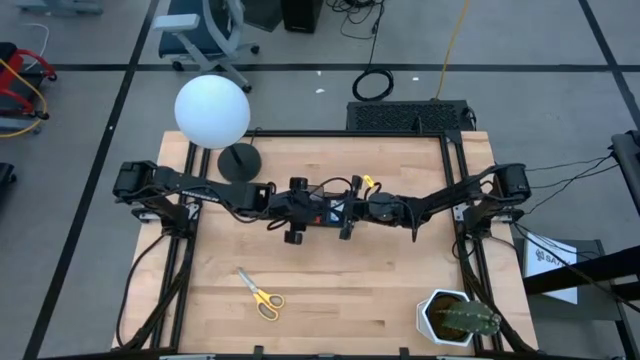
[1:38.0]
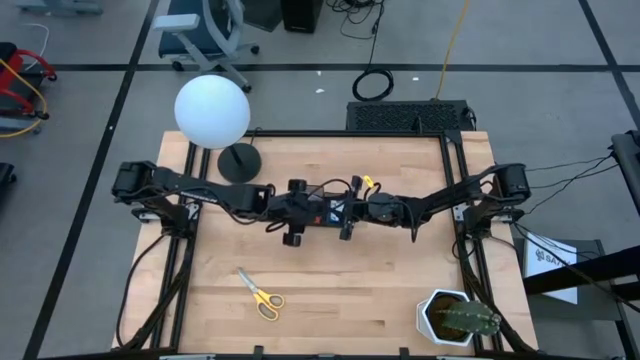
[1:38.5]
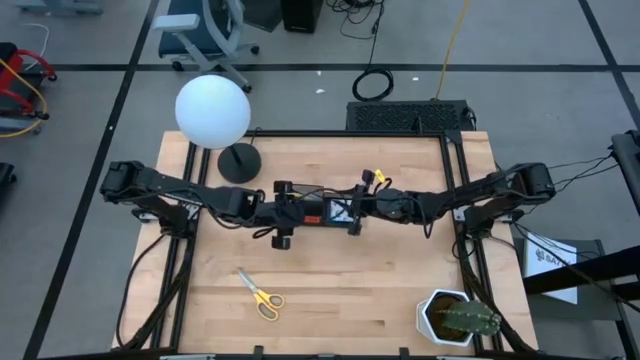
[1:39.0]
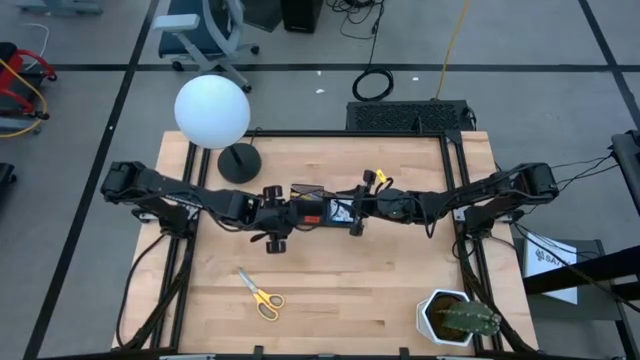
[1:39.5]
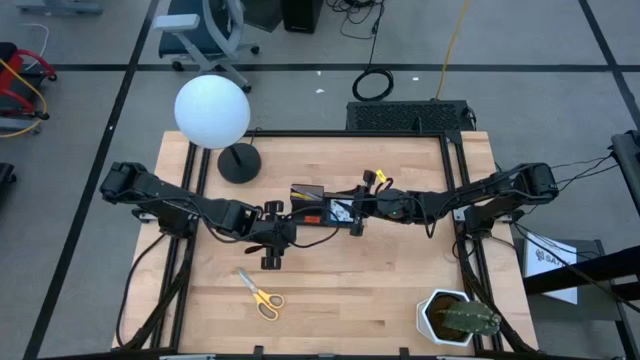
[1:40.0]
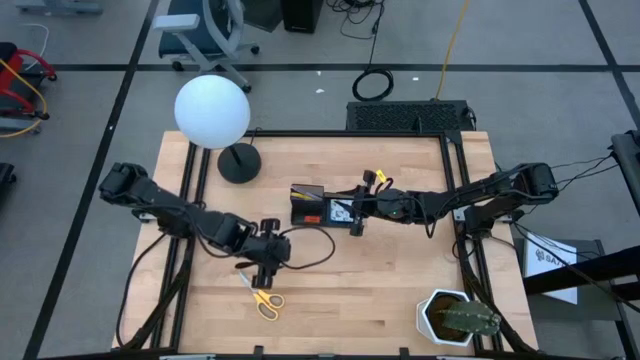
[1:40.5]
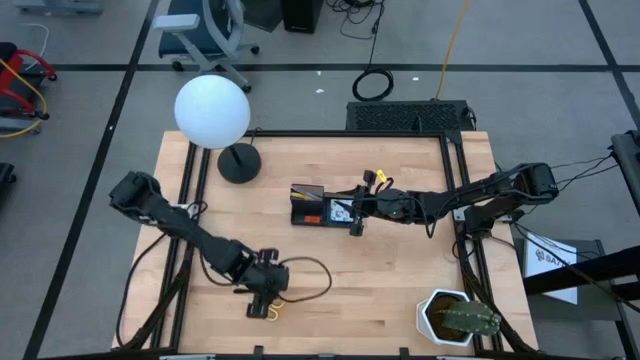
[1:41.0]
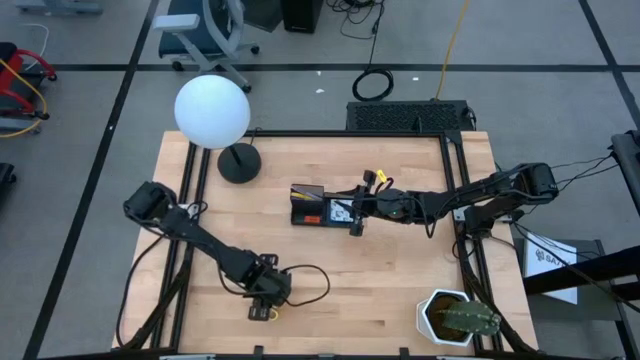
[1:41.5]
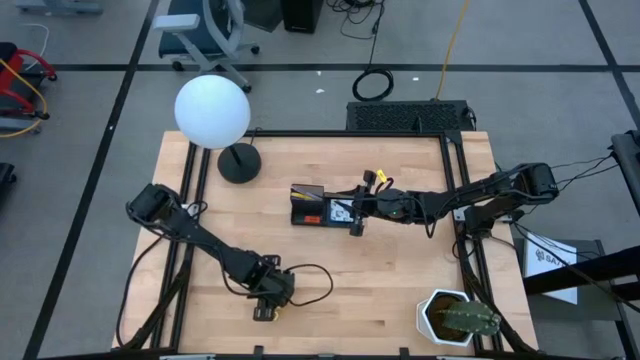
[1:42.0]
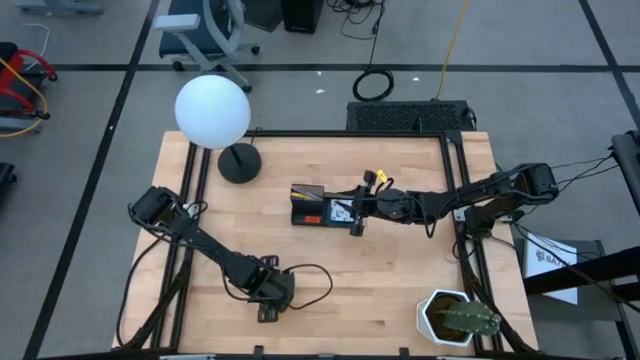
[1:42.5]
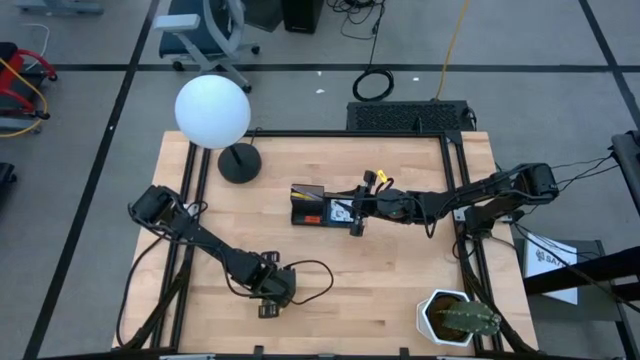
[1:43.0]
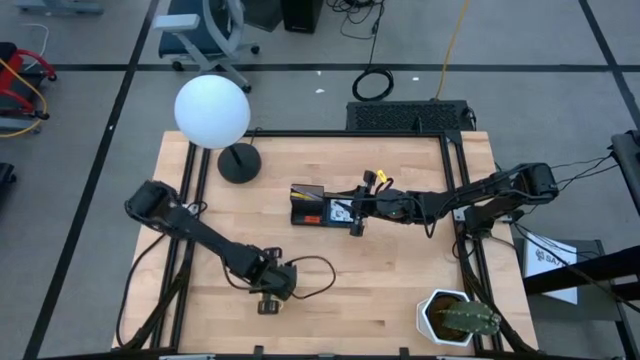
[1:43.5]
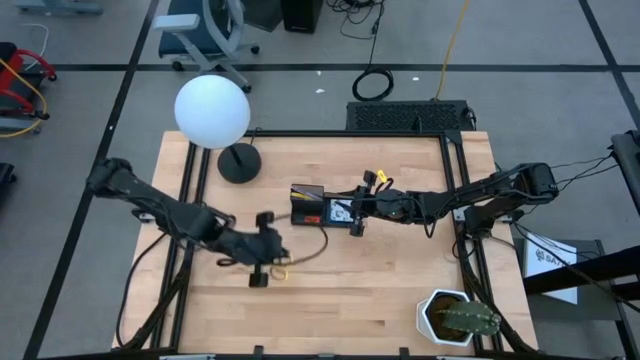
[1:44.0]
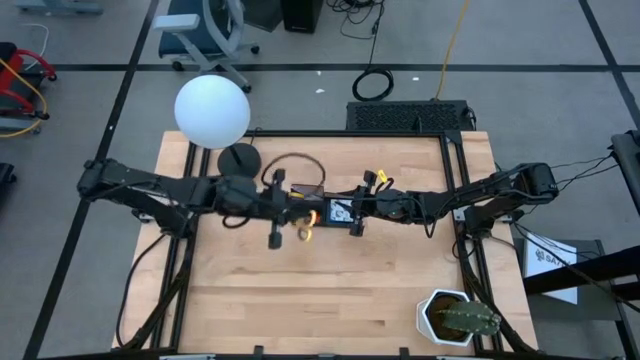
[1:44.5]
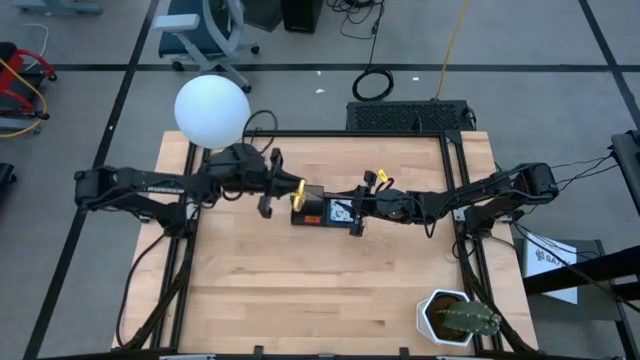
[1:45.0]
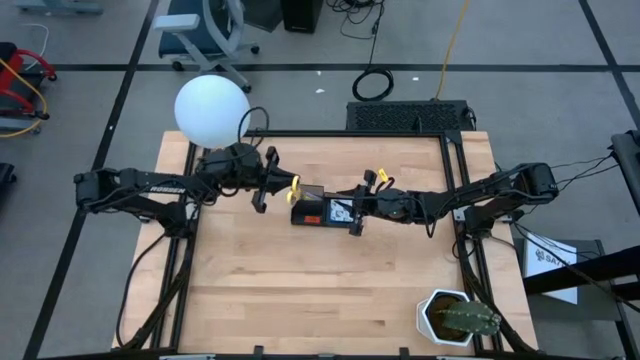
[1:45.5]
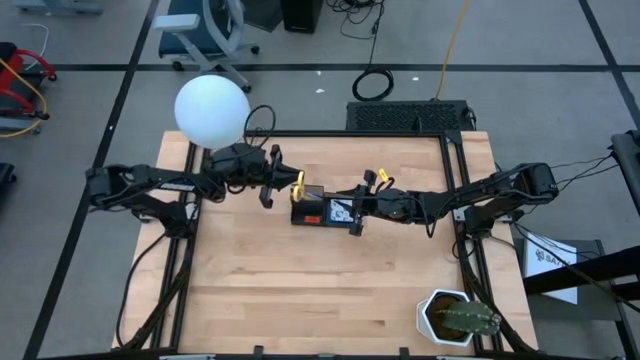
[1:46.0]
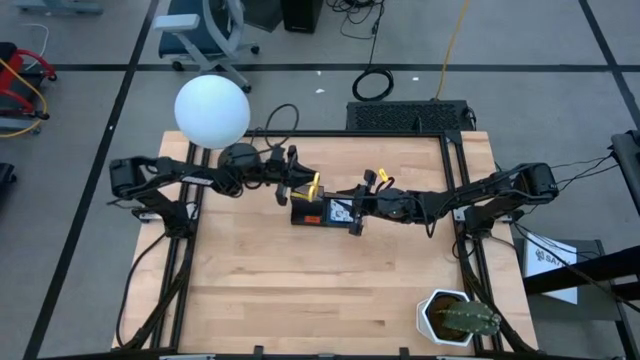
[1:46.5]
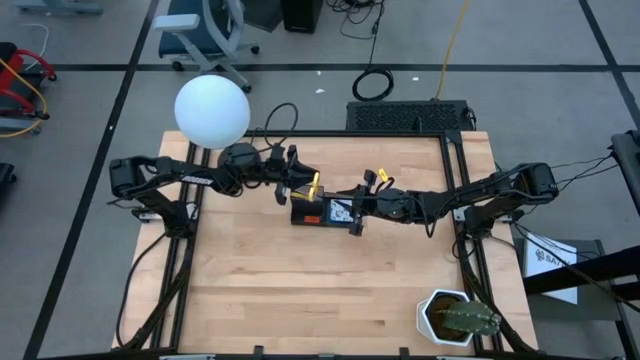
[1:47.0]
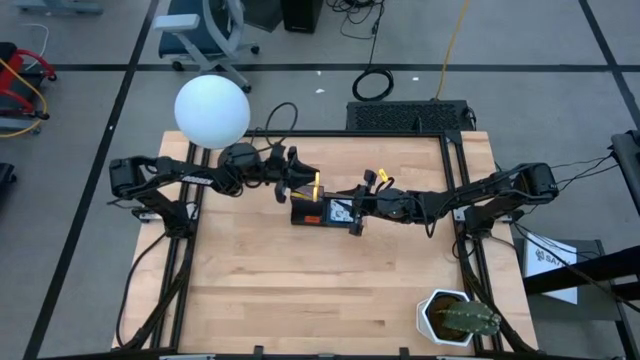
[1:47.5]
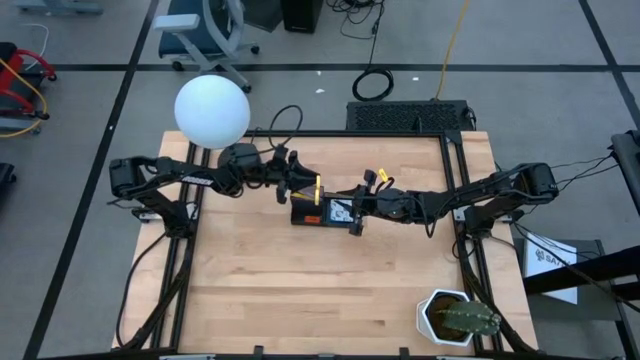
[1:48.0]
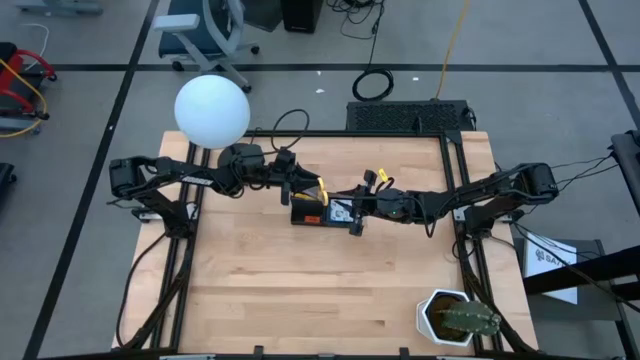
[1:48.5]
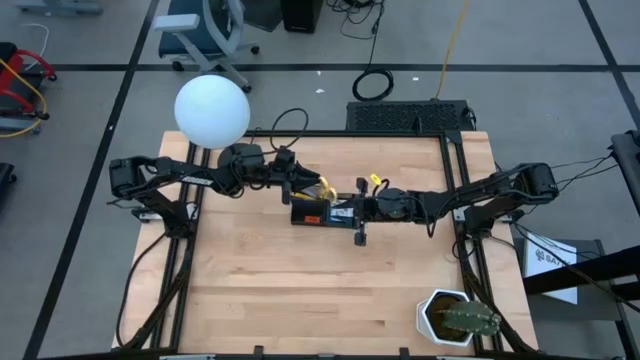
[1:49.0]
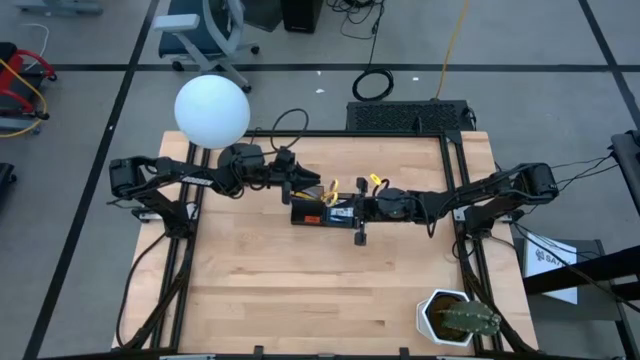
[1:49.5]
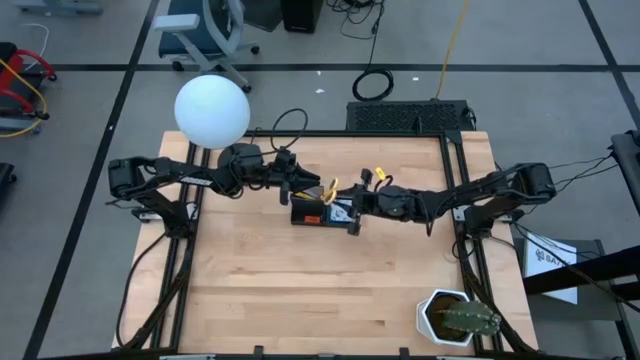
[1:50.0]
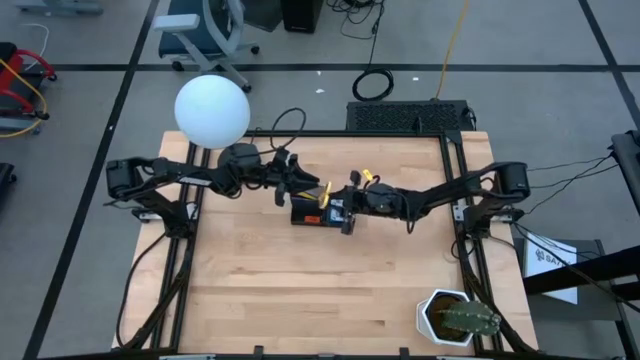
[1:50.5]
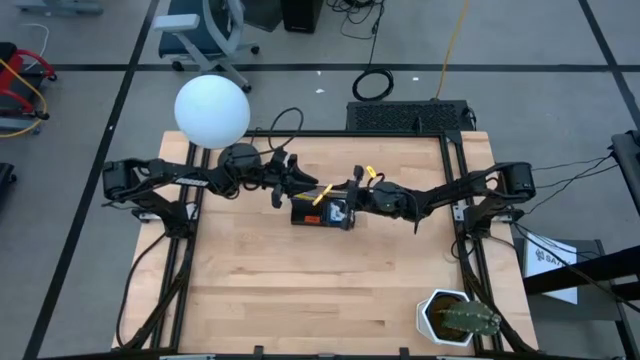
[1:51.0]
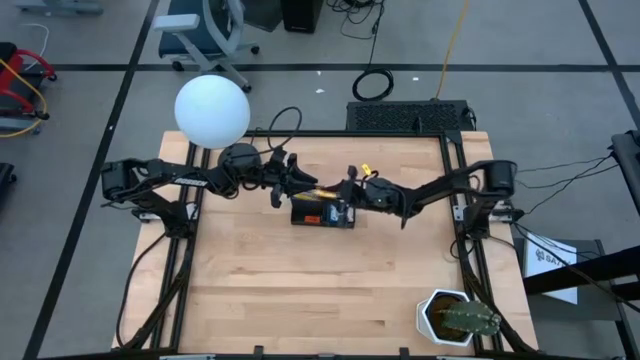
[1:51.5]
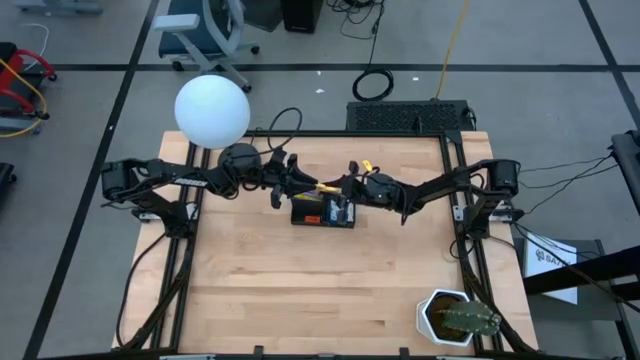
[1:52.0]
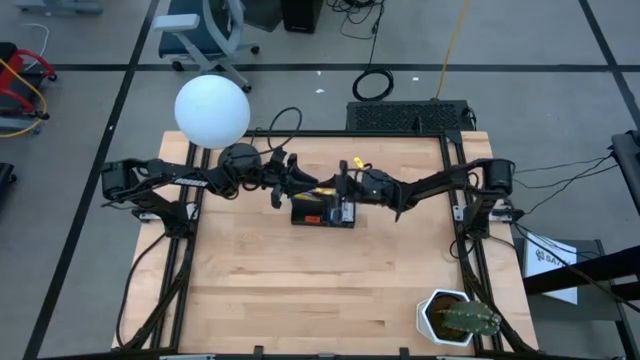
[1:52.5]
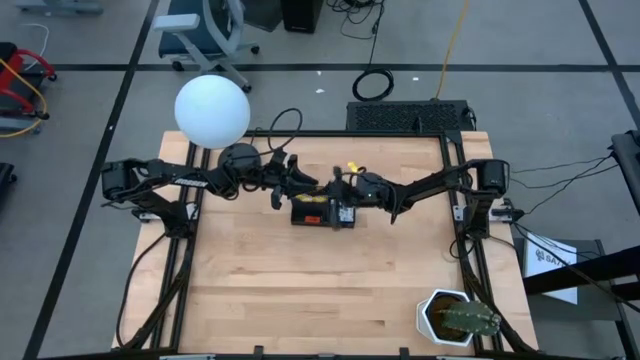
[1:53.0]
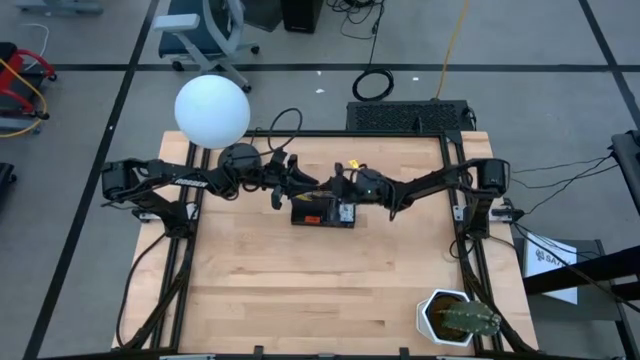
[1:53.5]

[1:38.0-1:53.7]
Task: Pick and place office supplies into organizer
Put the yellow scissors into the desk organizer

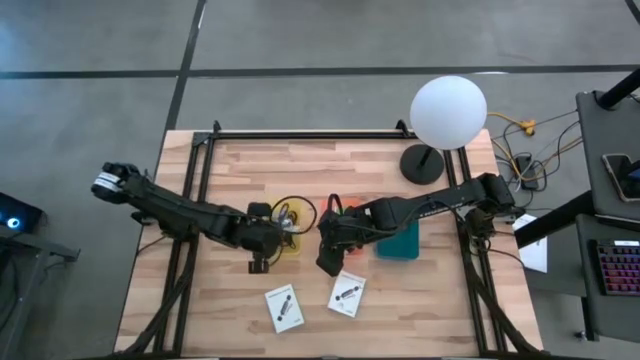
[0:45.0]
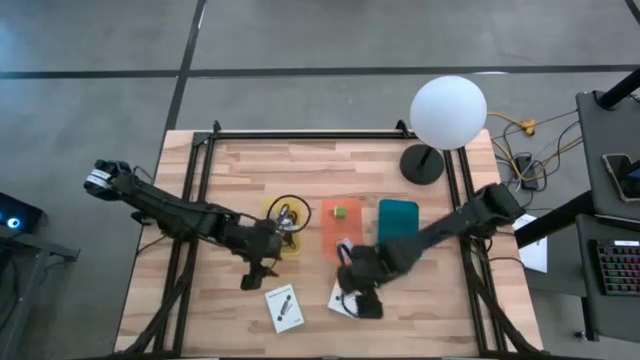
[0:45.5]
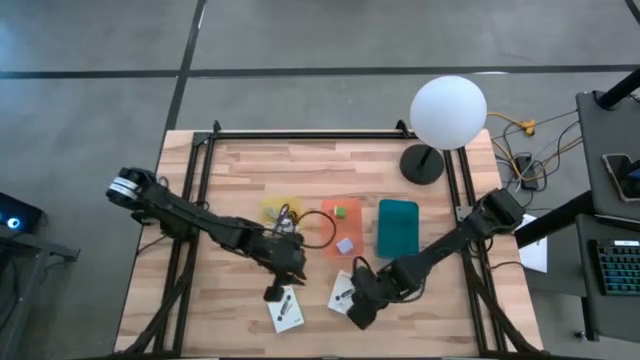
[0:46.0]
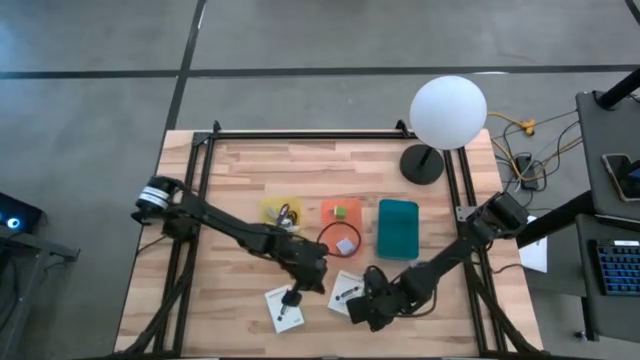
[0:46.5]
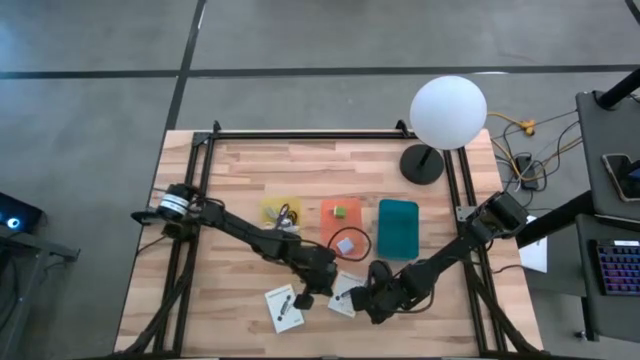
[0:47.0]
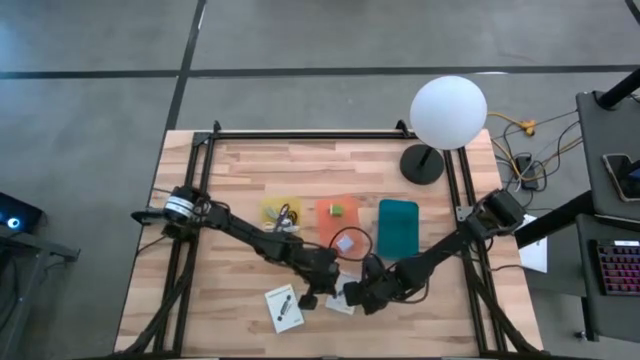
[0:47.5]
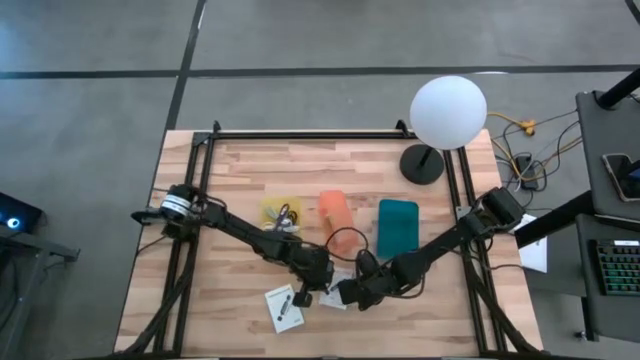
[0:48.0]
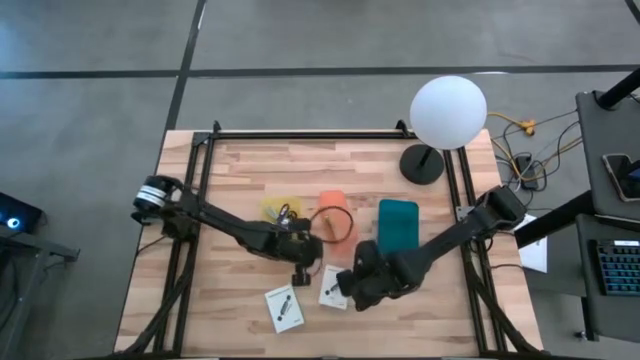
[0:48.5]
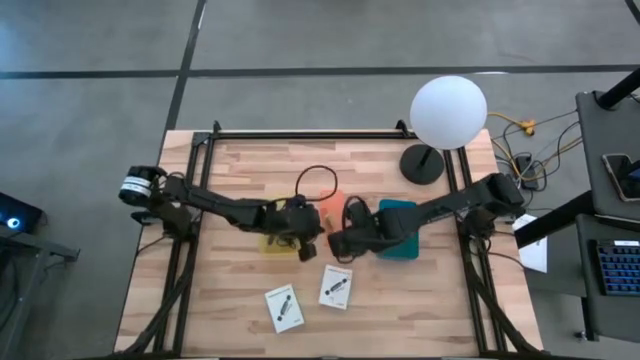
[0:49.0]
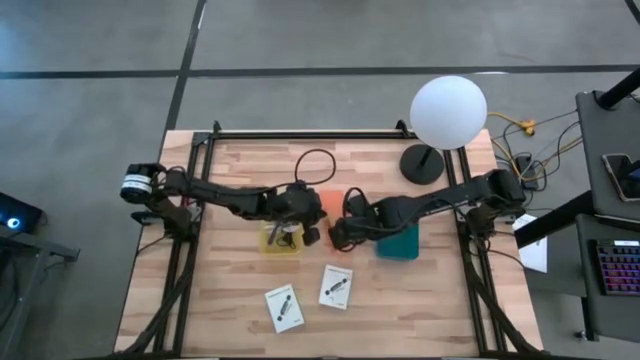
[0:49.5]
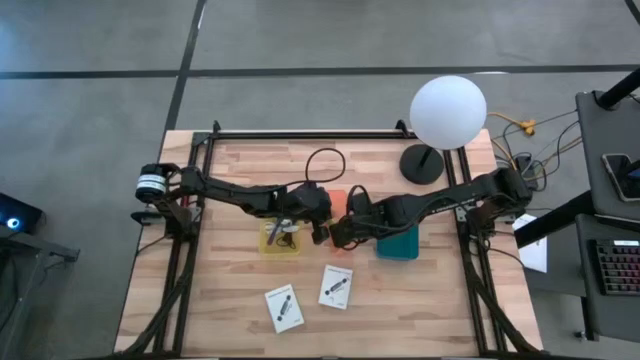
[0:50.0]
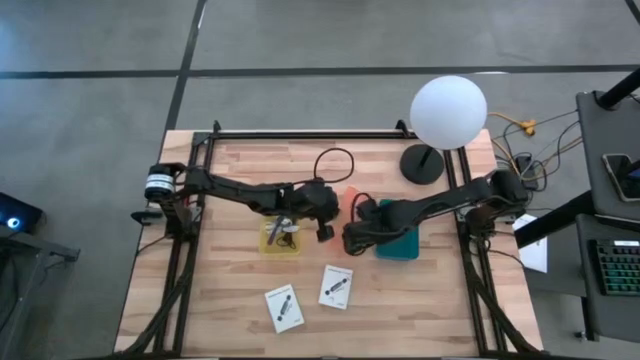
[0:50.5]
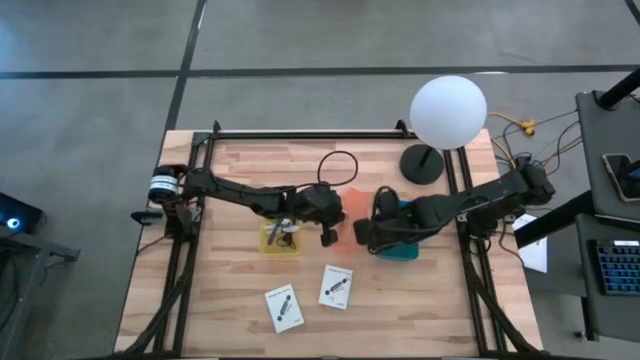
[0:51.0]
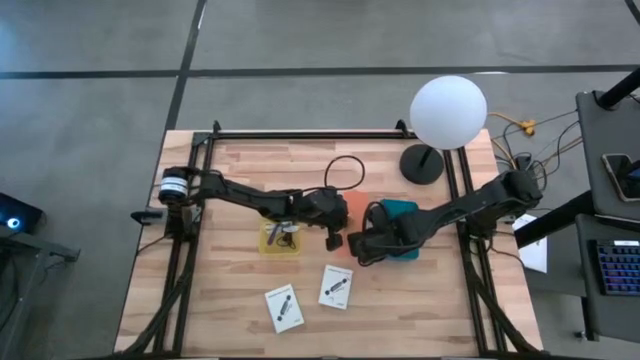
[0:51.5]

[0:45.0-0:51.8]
Task: Pick and place items into bin
Adjust the orange bin
